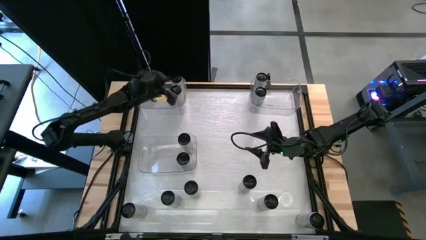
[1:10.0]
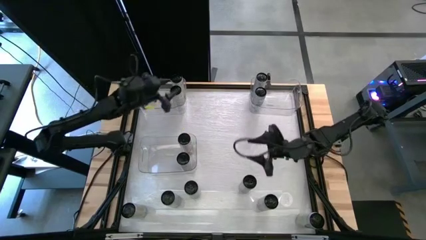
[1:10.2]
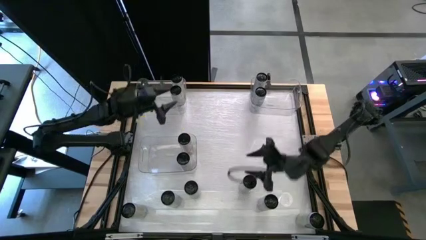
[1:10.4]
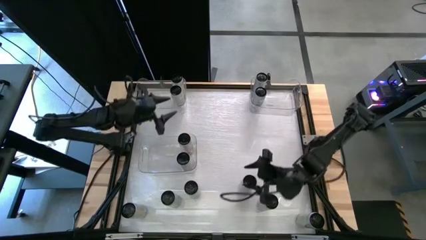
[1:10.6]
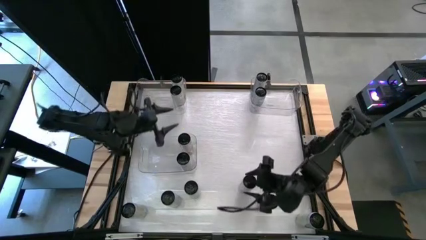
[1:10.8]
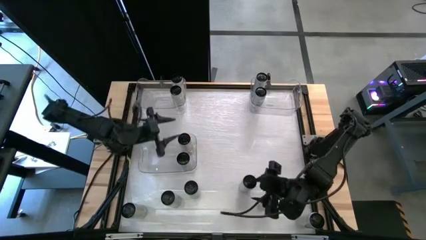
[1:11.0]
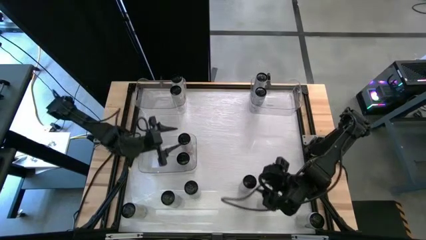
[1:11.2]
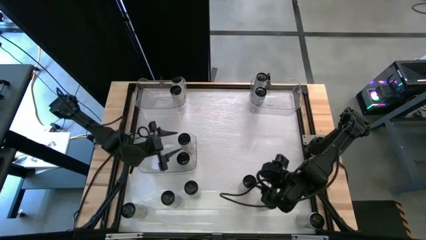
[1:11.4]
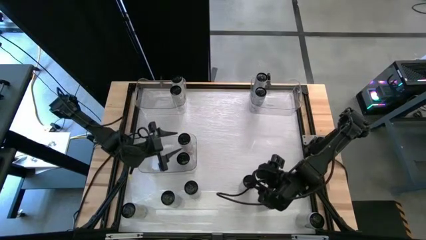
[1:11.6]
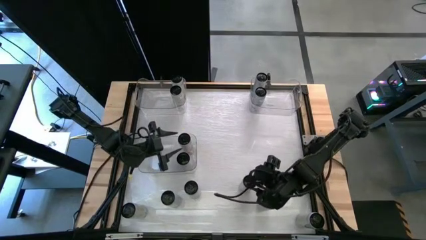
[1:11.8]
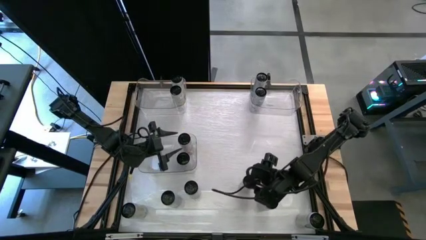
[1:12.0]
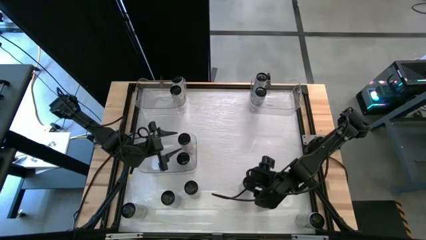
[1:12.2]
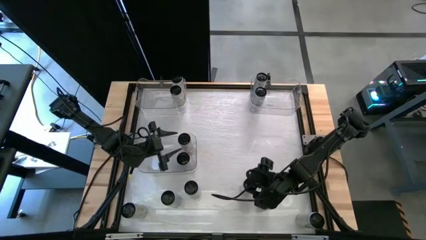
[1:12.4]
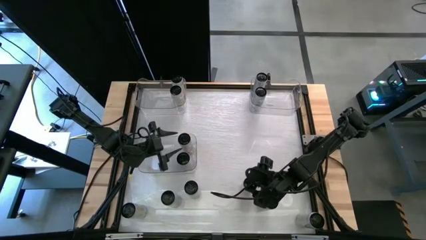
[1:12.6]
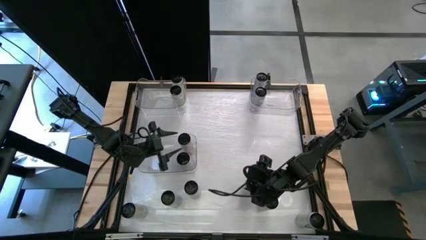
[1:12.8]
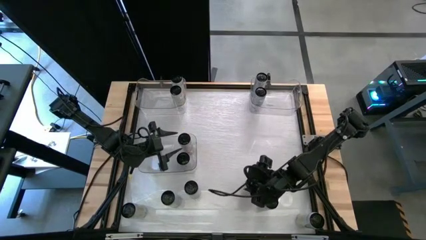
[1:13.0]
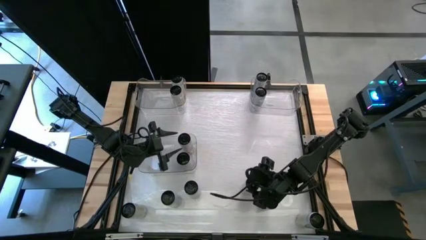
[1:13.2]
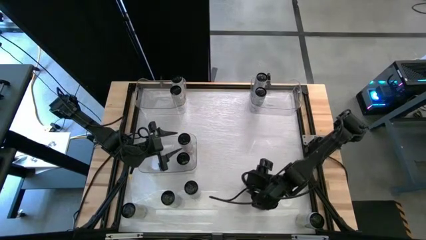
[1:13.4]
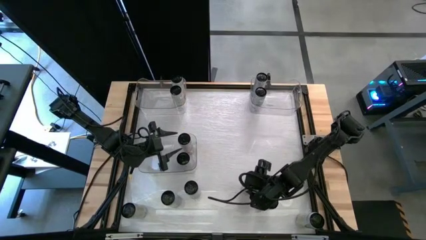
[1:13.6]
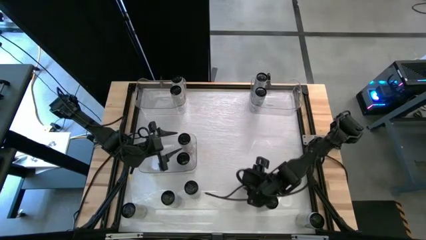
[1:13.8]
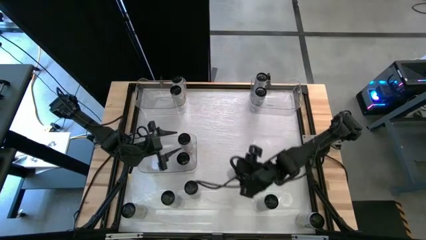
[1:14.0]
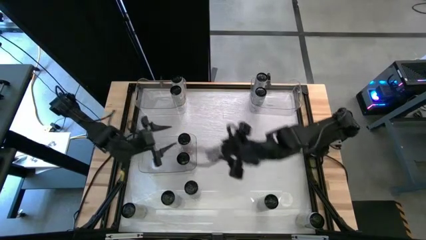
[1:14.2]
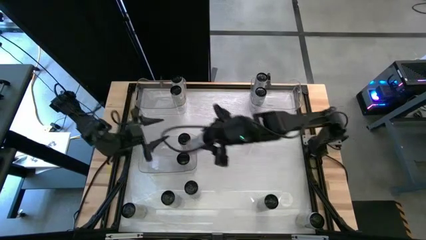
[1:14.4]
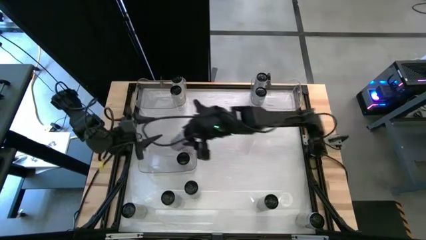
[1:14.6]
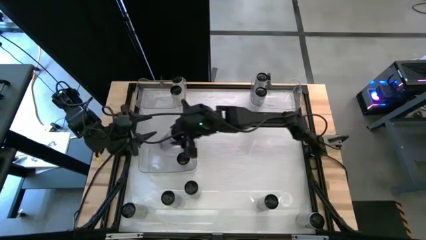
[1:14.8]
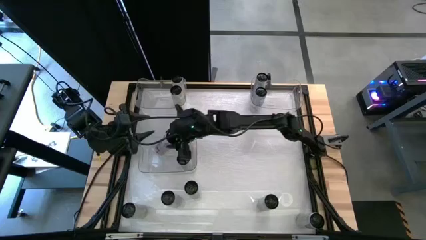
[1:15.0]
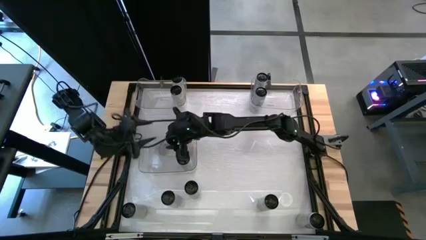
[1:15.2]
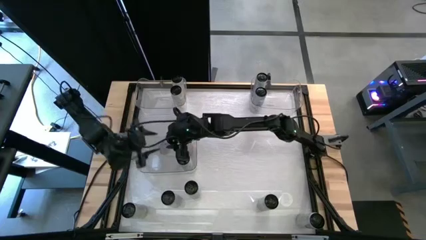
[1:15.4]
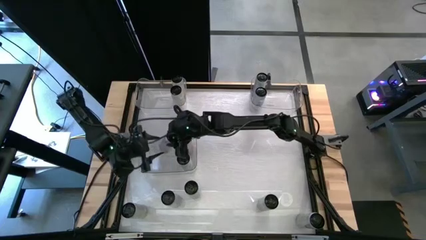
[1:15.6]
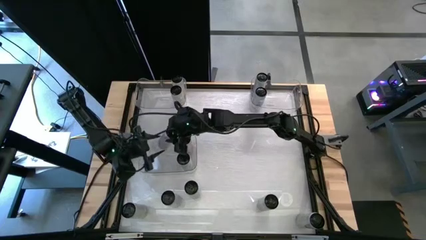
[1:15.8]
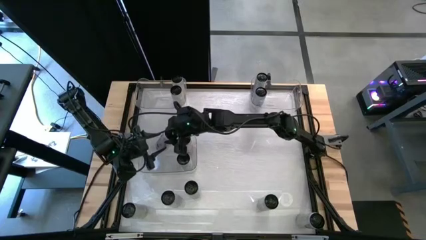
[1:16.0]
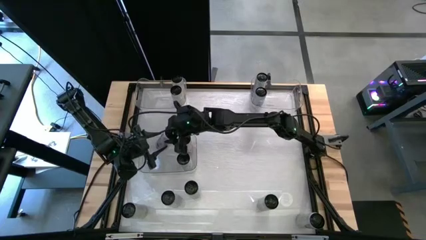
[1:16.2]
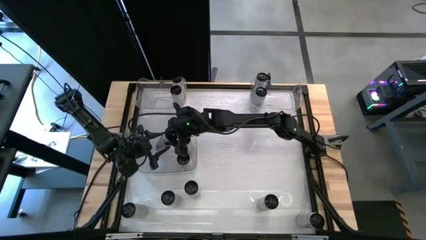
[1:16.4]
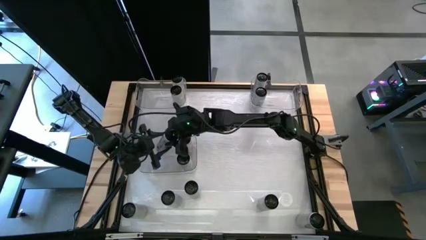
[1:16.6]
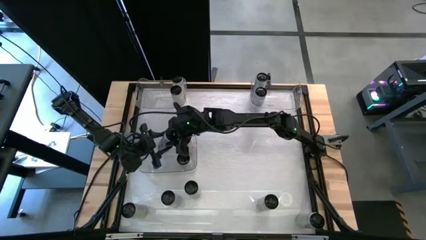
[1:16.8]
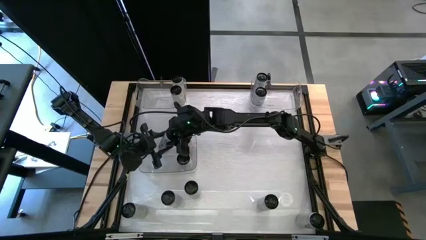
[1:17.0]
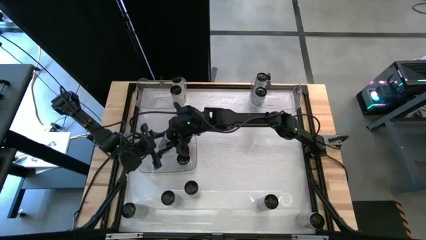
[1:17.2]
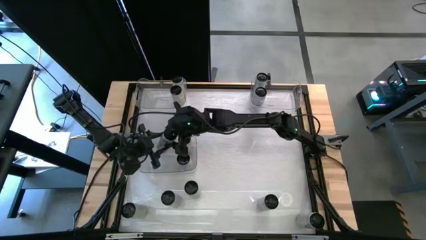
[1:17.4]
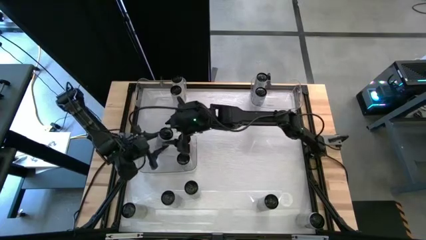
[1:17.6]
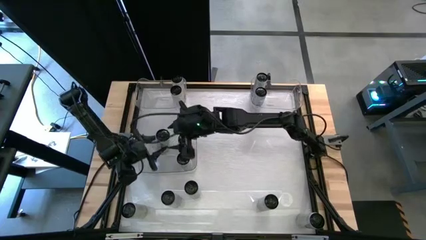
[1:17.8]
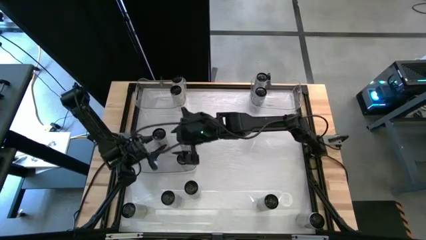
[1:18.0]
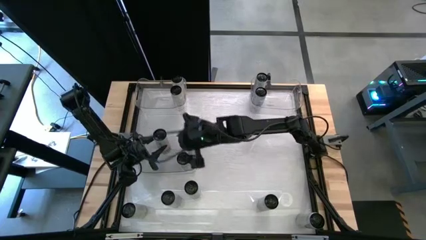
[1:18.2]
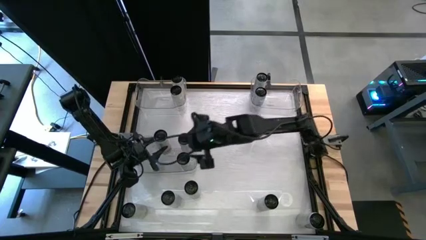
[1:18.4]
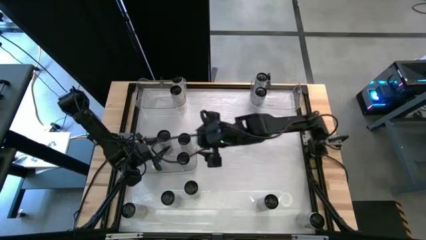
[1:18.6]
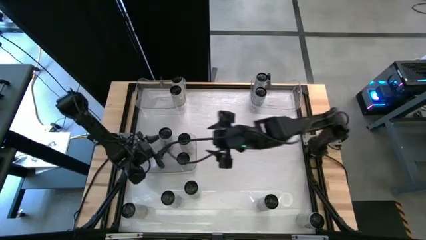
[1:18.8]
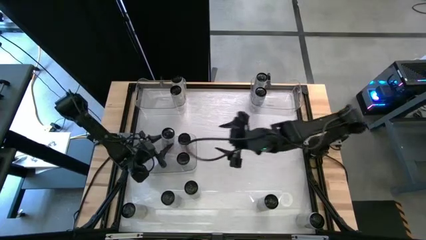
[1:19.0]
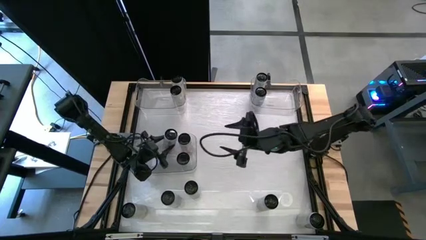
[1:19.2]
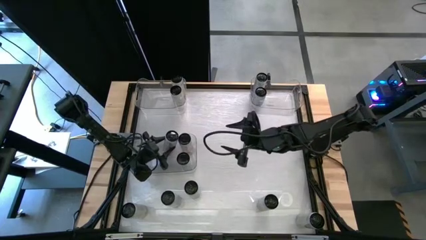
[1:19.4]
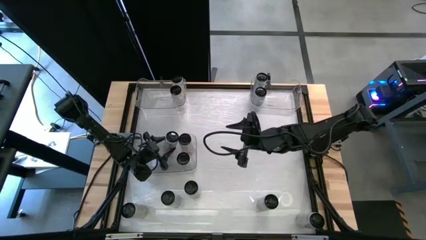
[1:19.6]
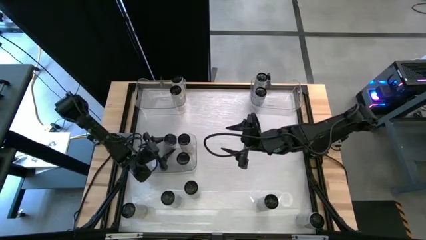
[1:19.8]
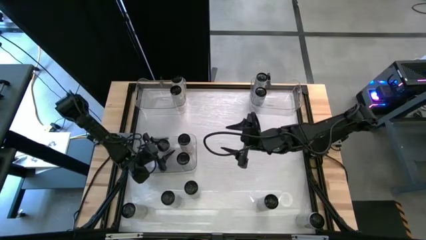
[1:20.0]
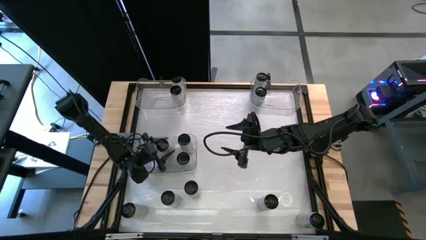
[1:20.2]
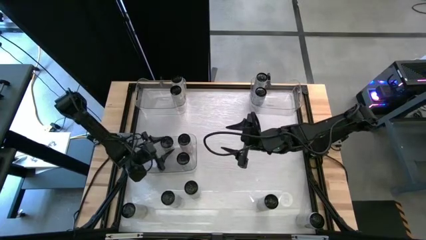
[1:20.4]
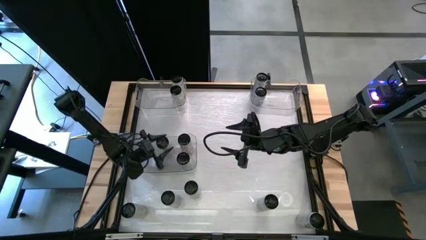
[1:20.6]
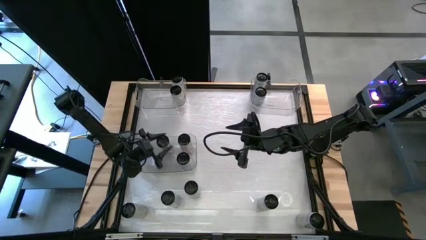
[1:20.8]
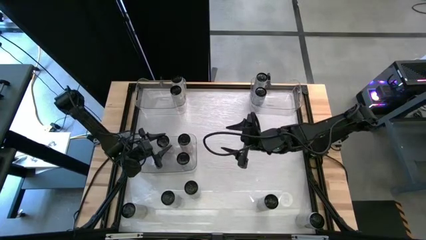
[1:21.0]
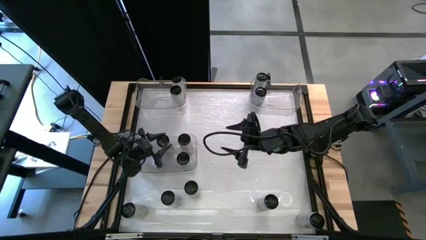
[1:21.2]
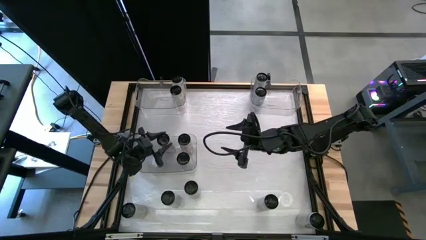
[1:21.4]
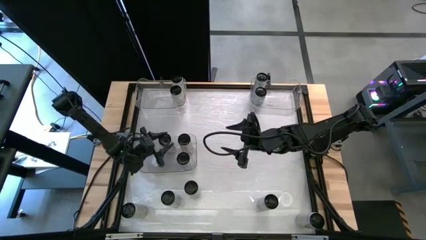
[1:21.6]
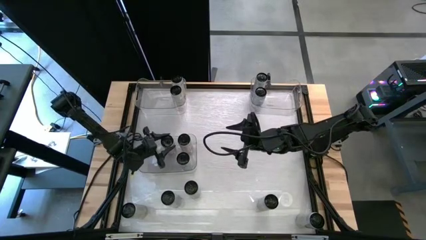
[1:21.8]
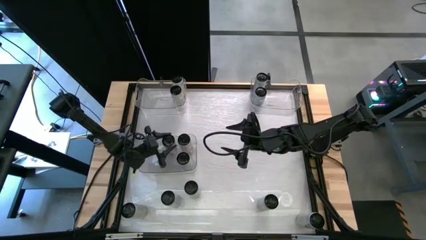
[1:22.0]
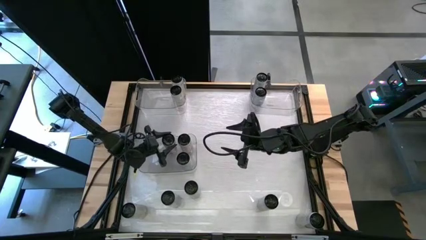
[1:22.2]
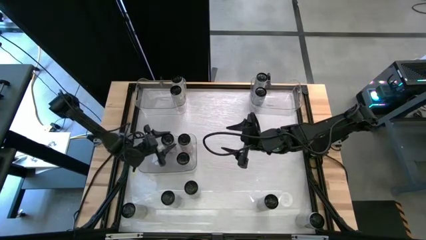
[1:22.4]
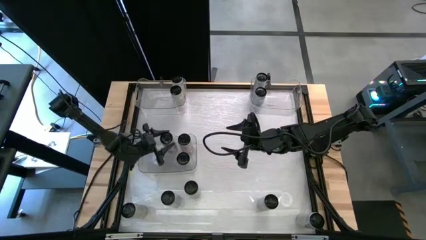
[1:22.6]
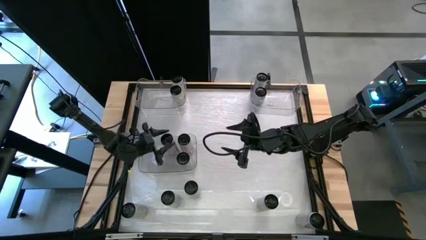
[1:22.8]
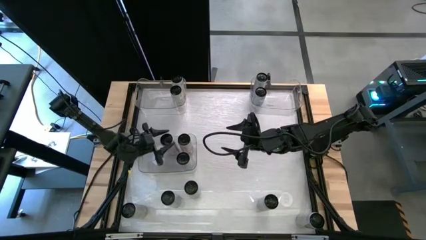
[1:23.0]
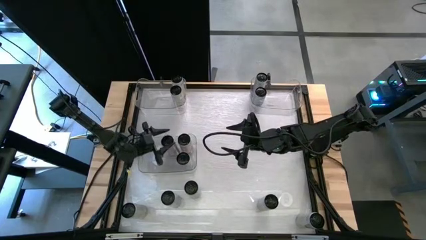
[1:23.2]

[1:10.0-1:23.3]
Task: Sort soda cans
Put the white-pink can into the bottom transparent bin

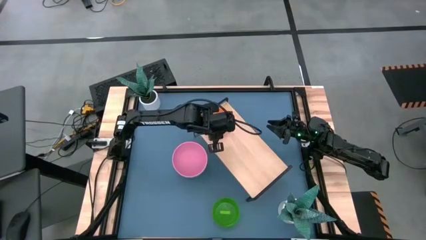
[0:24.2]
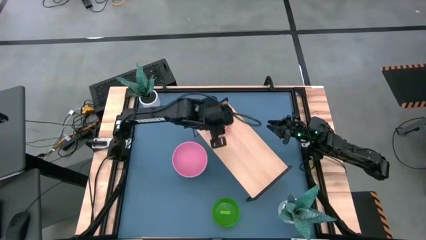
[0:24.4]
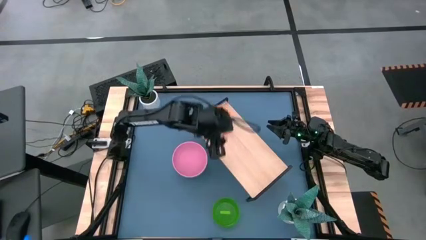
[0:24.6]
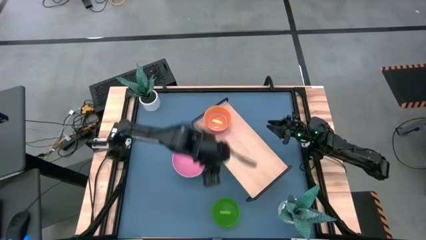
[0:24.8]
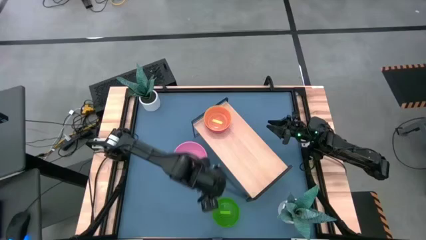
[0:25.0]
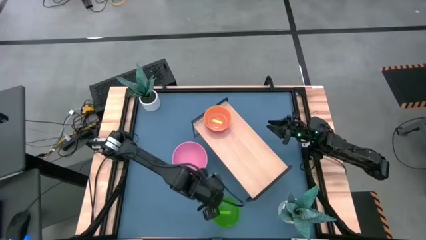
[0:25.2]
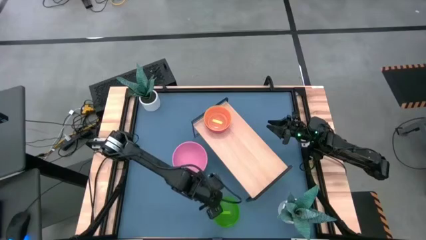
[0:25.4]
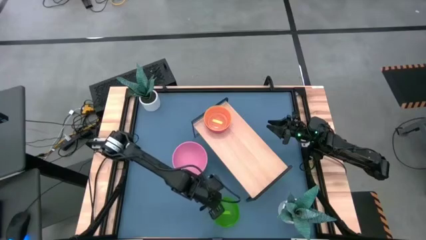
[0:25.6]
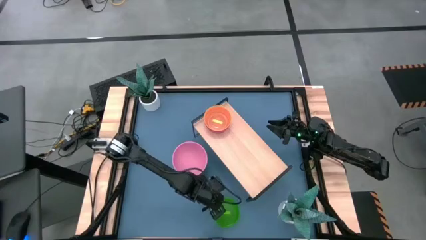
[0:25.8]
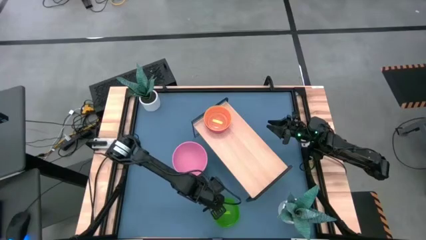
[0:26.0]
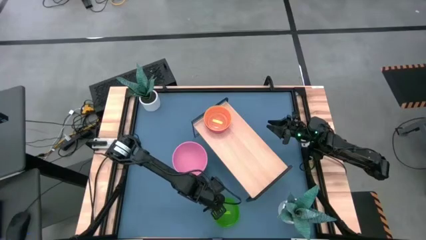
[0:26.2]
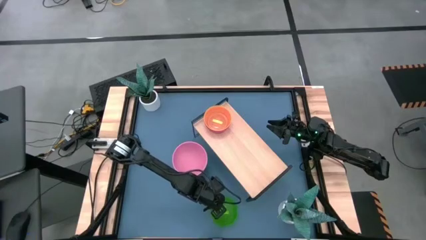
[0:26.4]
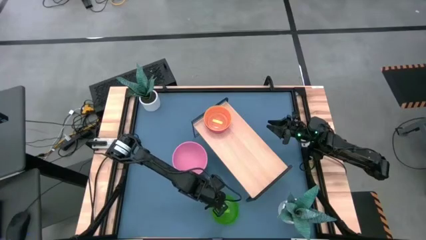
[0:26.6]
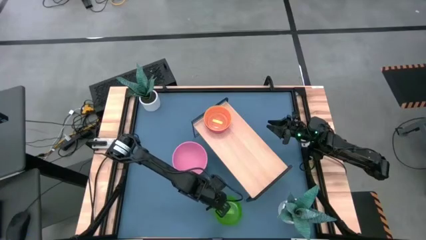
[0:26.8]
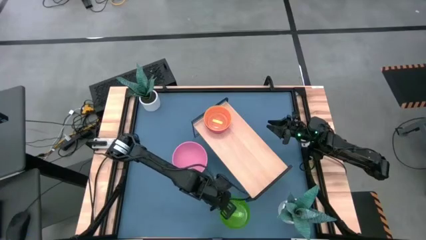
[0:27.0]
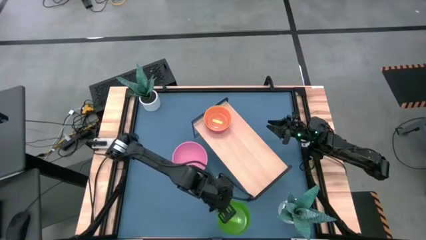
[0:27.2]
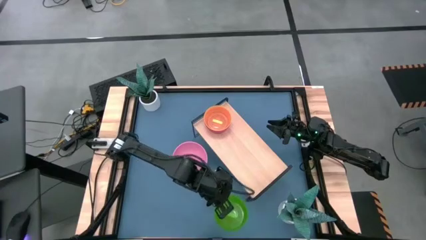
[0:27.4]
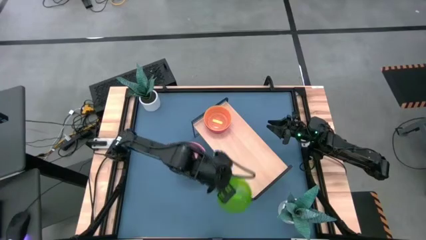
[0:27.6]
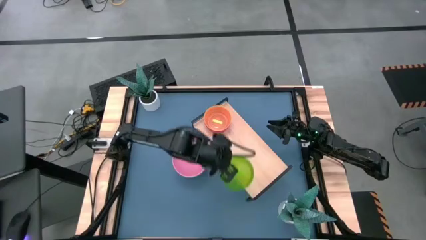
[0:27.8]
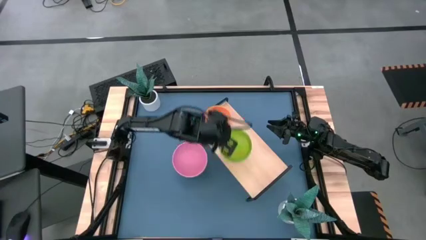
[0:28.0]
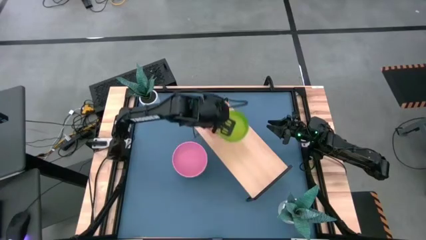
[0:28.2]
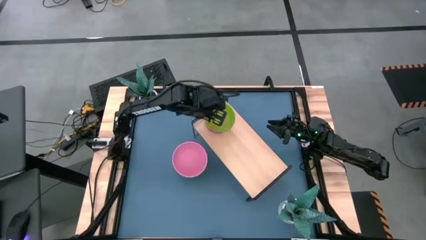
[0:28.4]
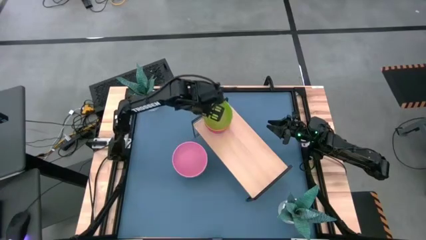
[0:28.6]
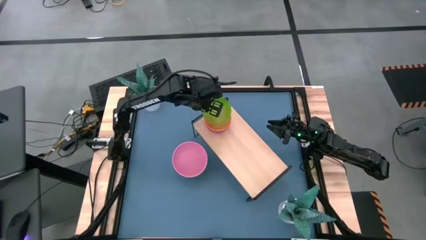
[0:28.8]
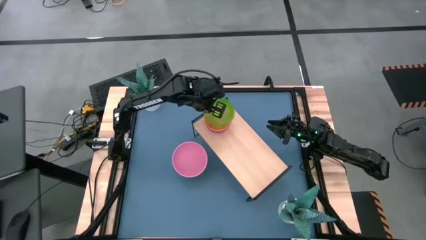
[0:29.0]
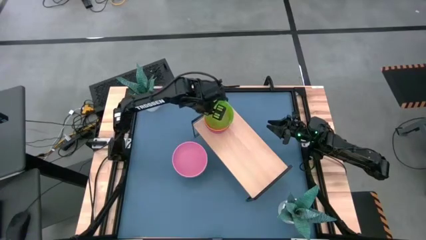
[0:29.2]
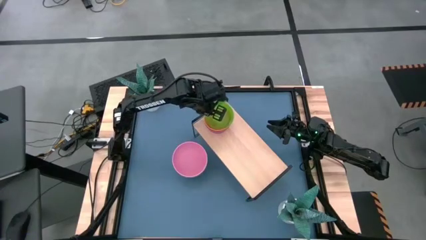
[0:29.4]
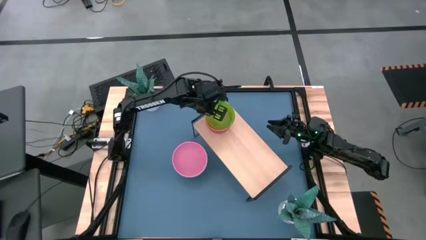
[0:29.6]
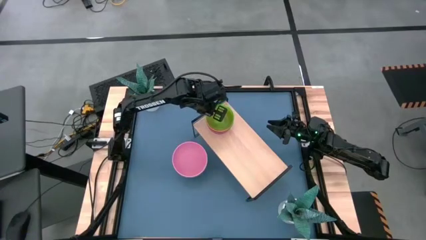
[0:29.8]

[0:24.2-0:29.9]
Task: Place and stack bowls onto a shelf
Stack the green bowl on top of the yellow bowl on the shelf
